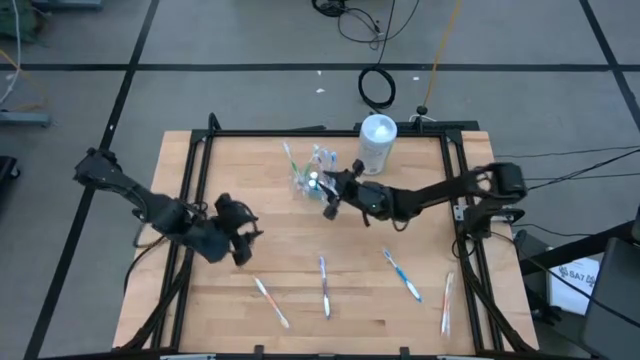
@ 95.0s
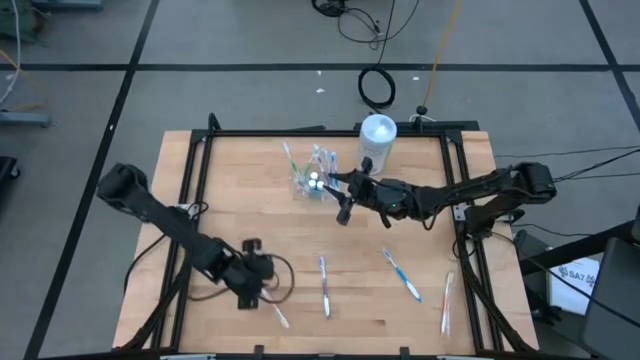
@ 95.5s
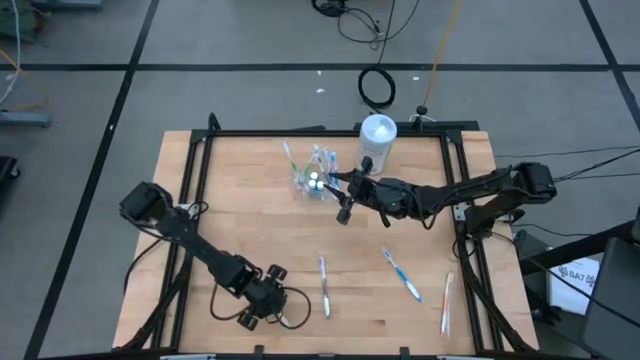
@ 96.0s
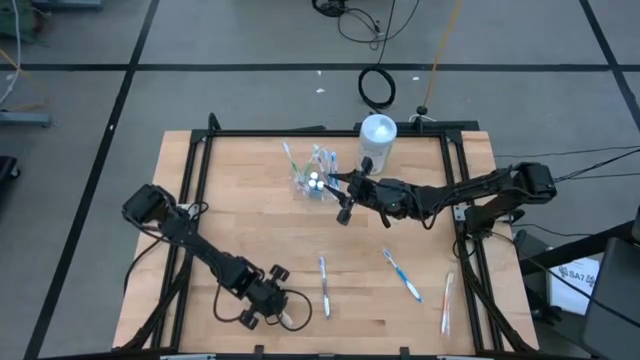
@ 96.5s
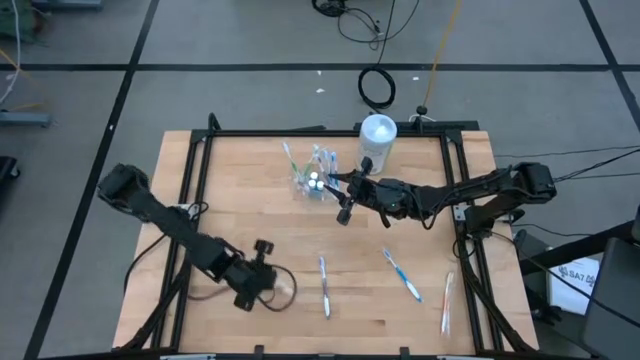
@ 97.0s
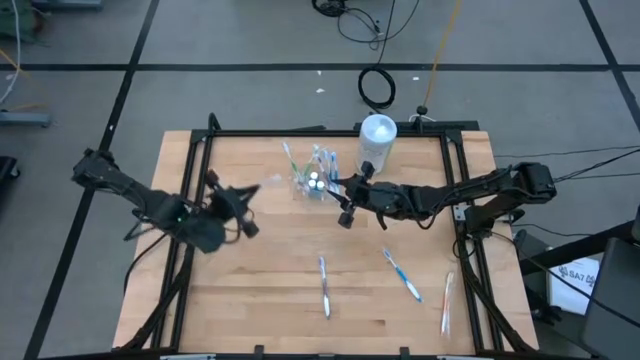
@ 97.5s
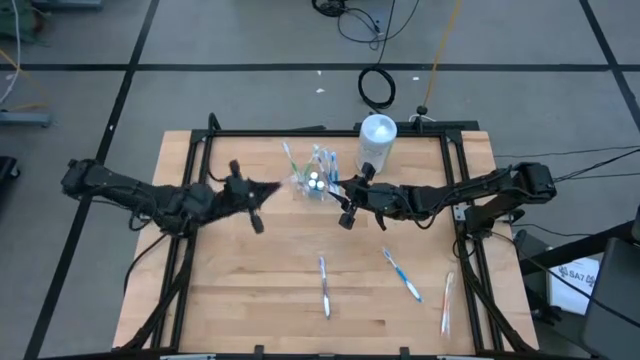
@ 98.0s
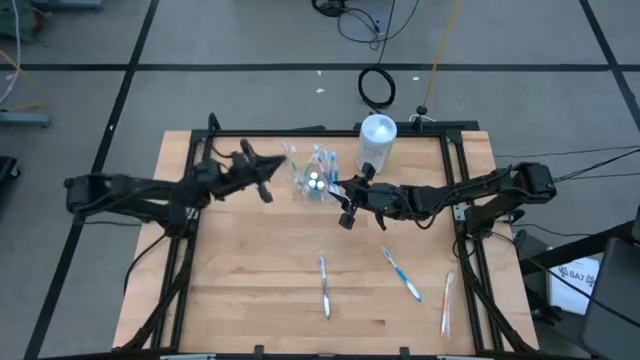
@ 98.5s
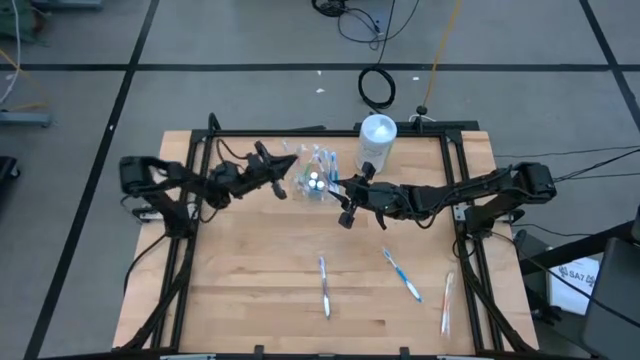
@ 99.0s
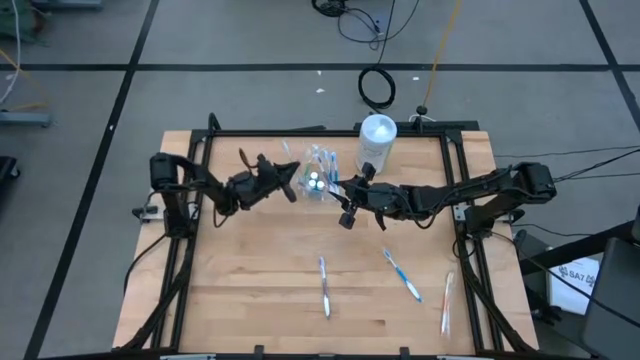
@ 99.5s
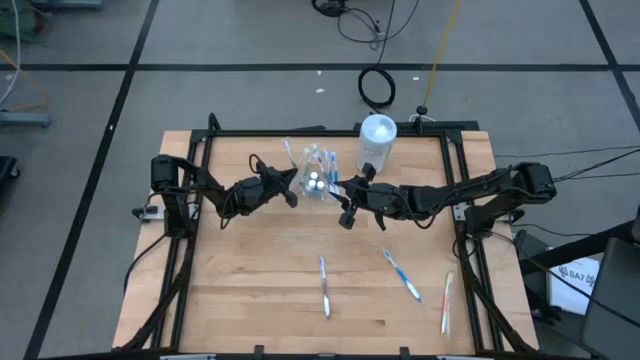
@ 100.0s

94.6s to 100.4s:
Task: Pick & Place toothbrushing station
Put the left orange toothbrush in the left compartment of the transparent organizer

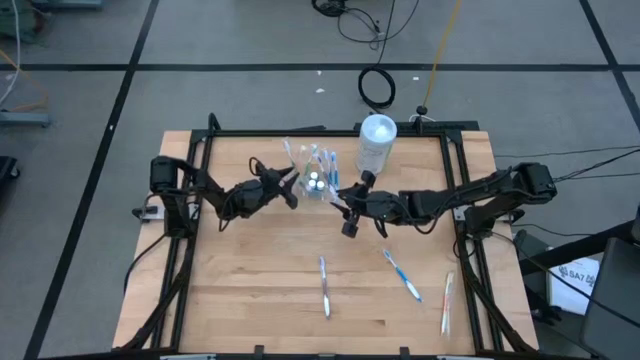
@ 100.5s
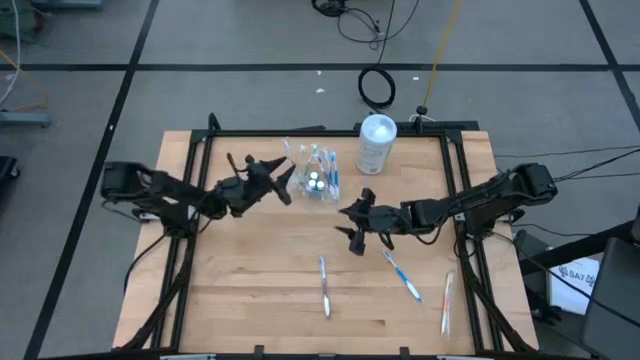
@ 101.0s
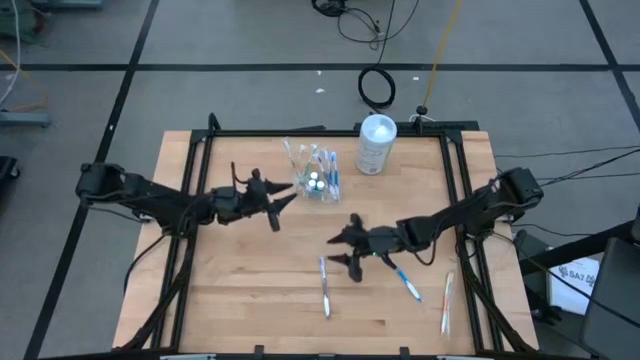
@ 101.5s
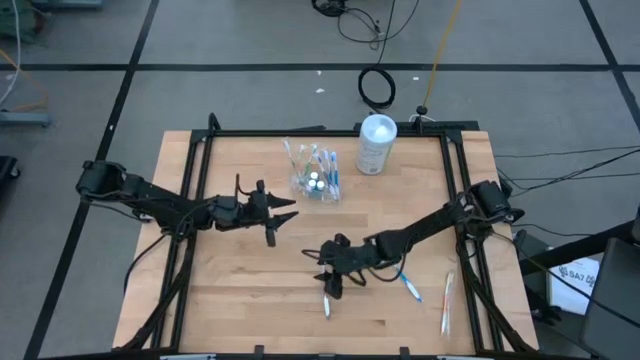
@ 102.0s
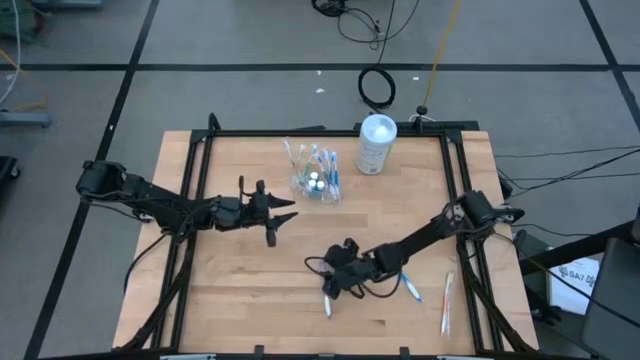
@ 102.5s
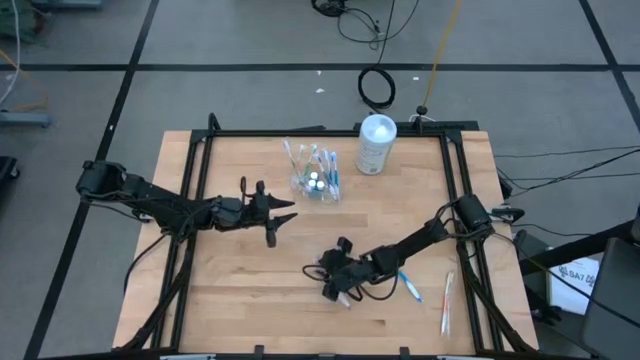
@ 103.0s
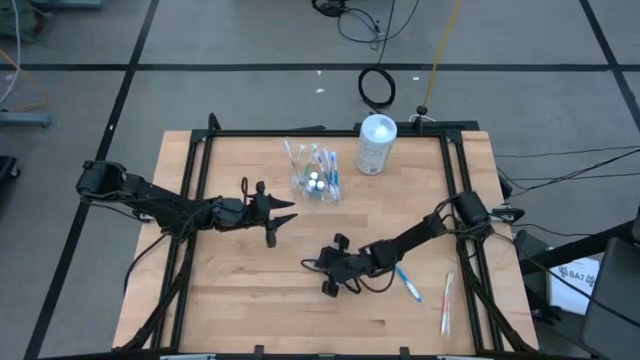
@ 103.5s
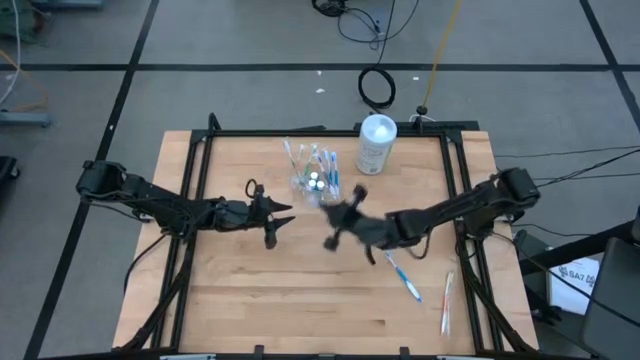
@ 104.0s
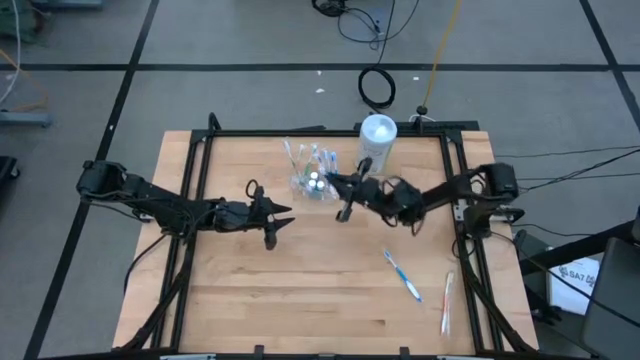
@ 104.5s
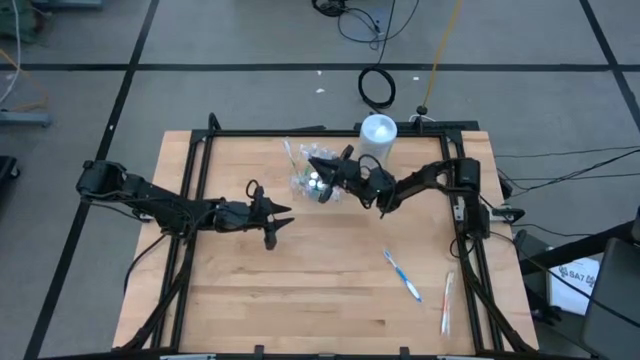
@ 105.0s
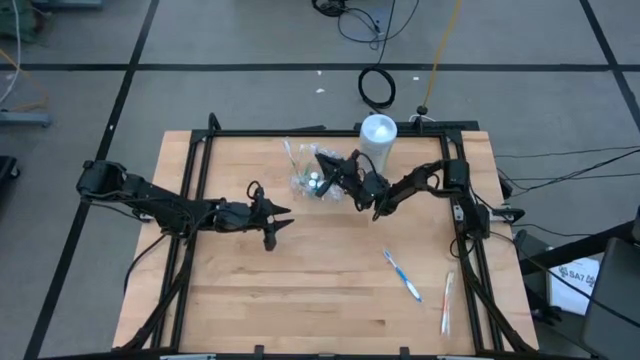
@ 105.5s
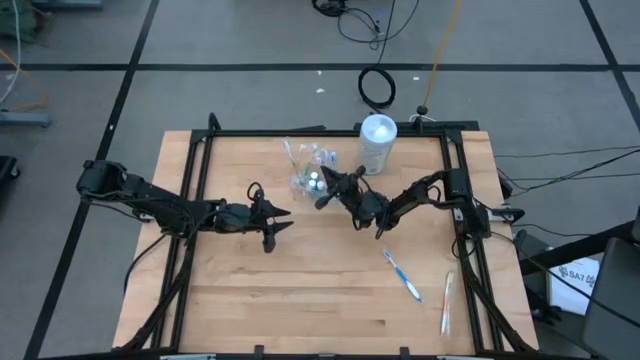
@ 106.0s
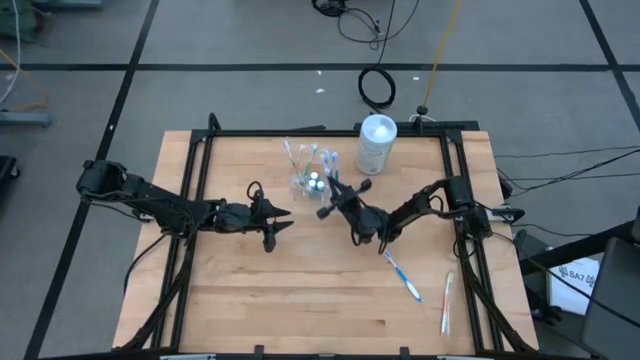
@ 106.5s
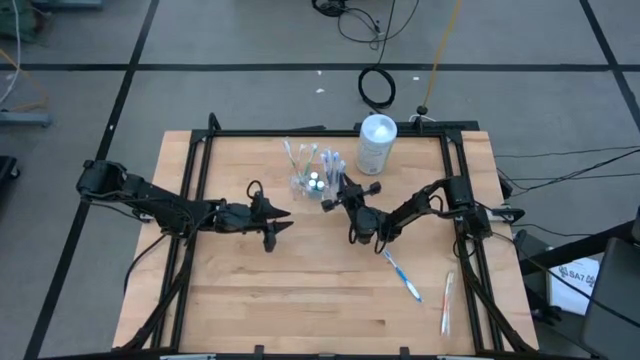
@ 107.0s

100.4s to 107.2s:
Put the purple toothbrush in the right compartment of the transparent organizer

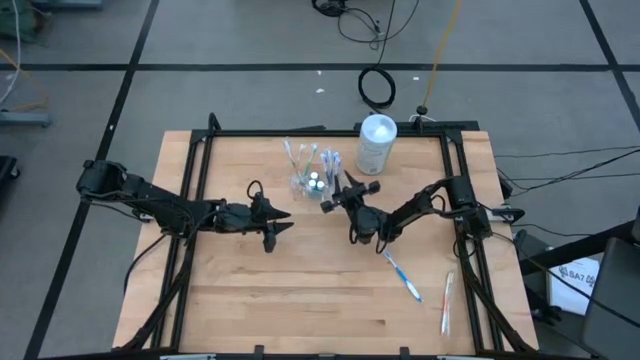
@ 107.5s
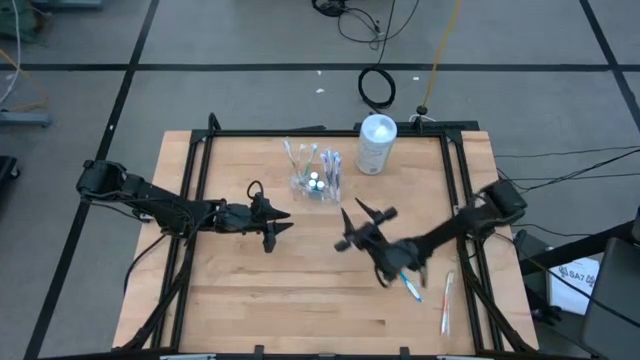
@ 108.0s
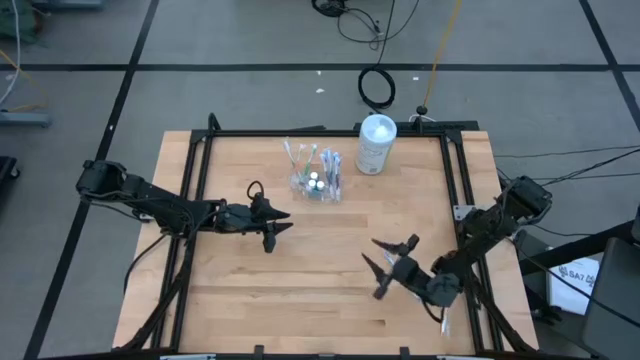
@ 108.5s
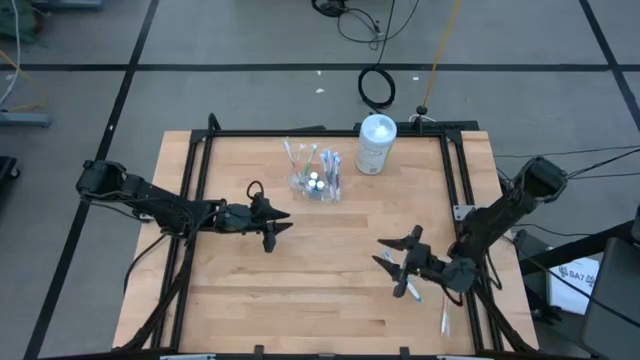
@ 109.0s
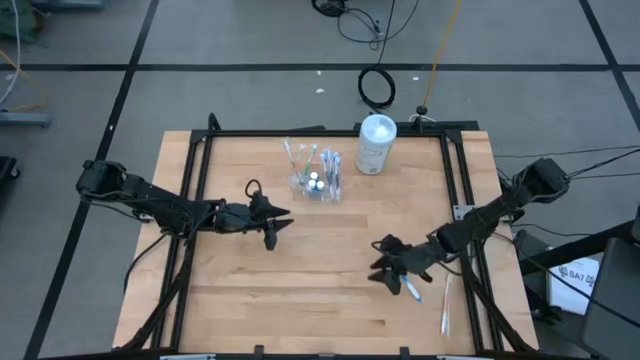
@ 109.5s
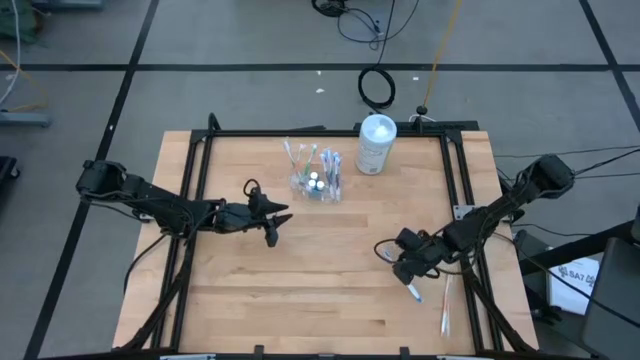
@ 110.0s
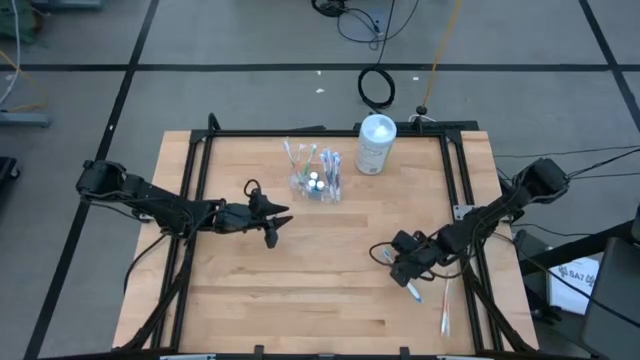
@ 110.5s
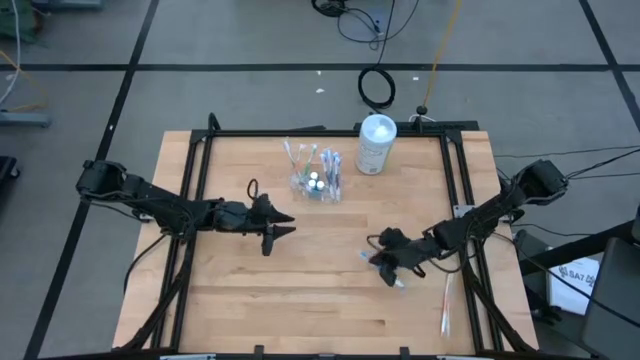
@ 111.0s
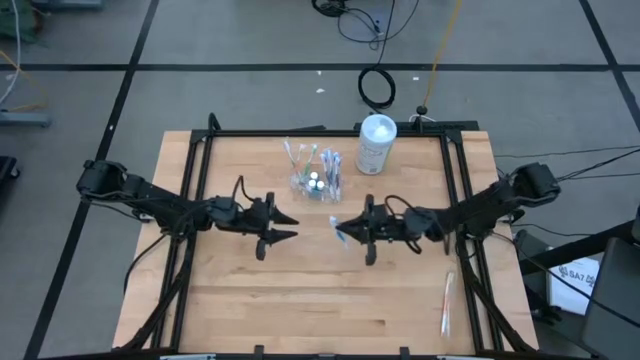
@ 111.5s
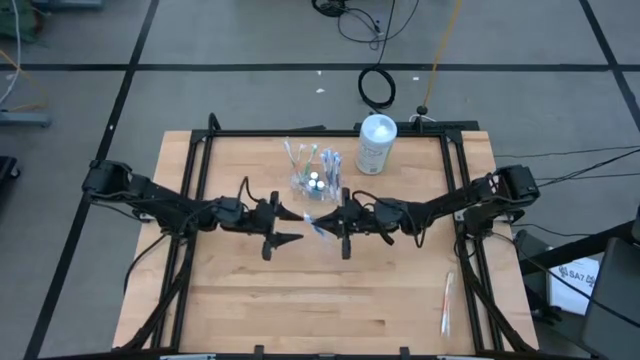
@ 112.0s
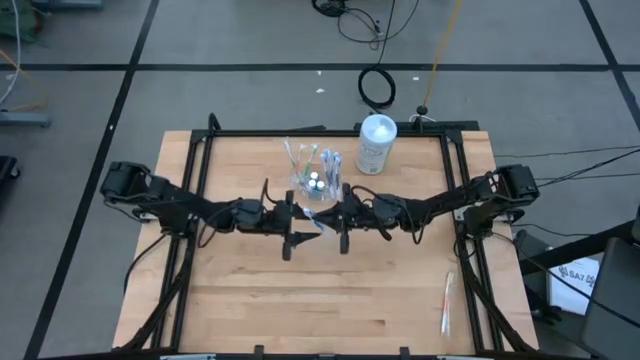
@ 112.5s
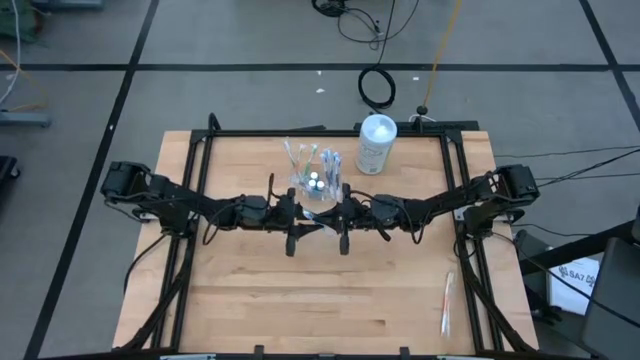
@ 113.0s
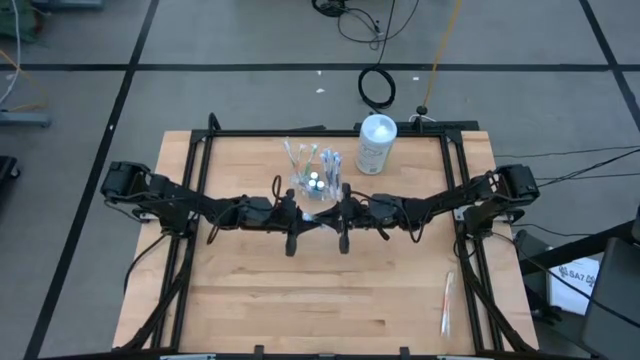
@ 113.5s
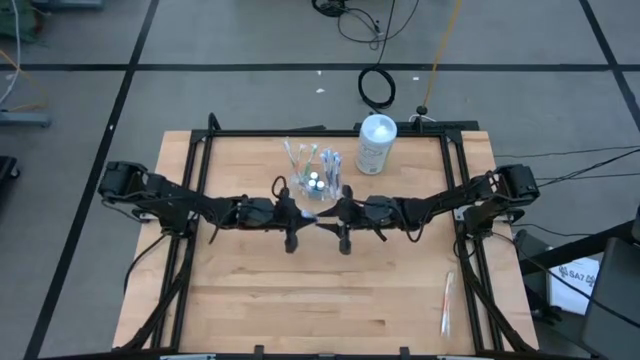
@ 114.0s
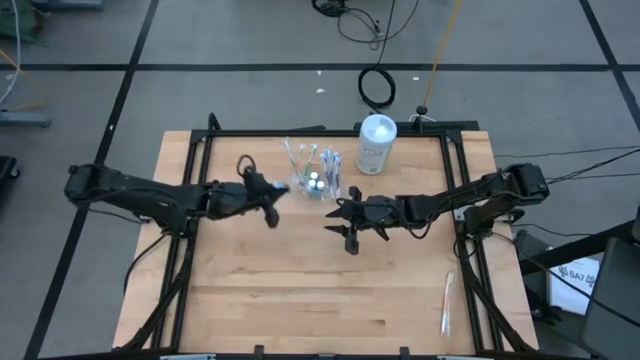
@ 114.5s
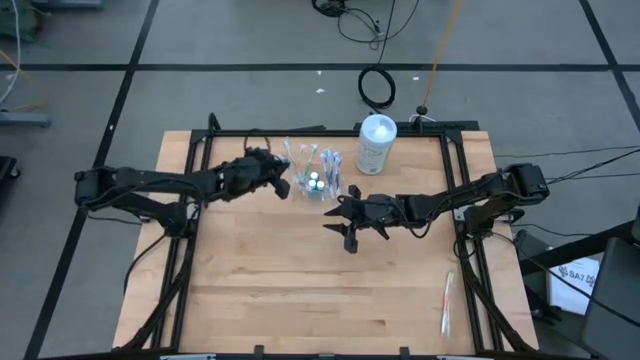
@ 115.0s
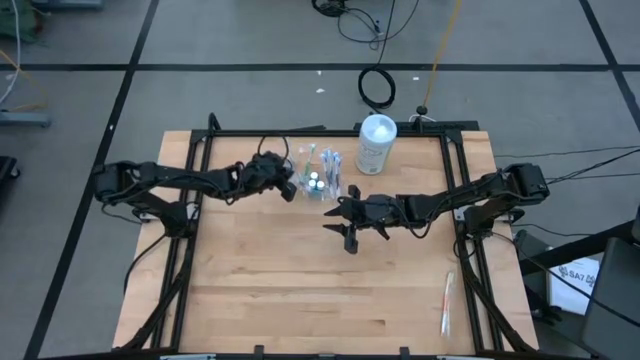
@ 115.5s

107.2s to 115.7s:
Put the blue toothbrush in the left compartment of the transparent organizer
